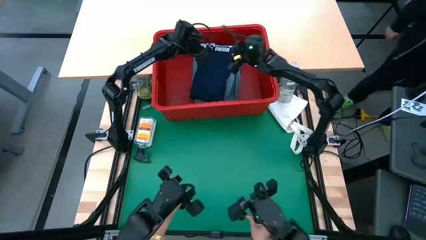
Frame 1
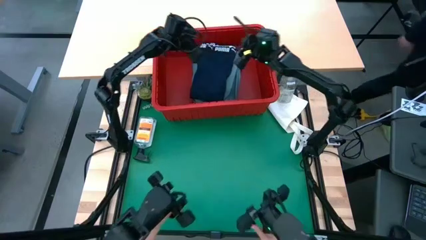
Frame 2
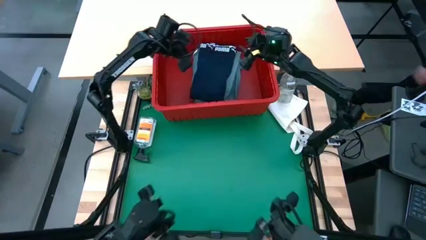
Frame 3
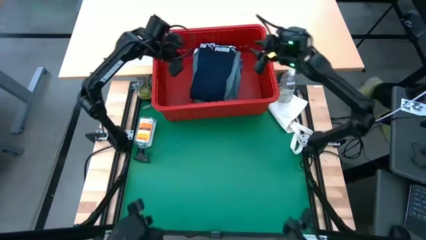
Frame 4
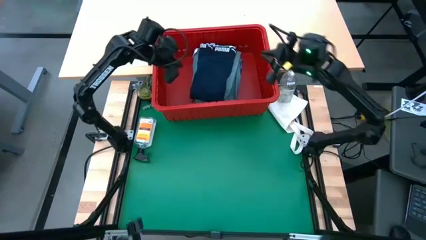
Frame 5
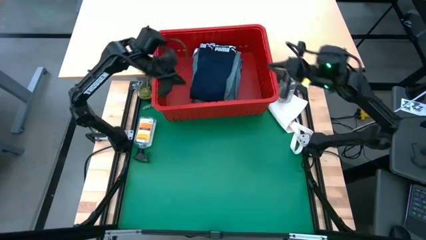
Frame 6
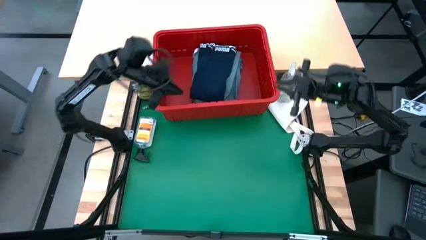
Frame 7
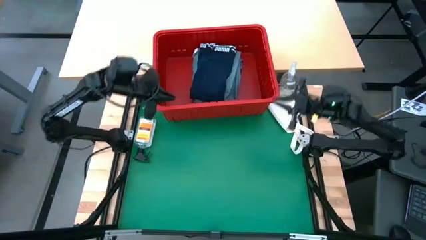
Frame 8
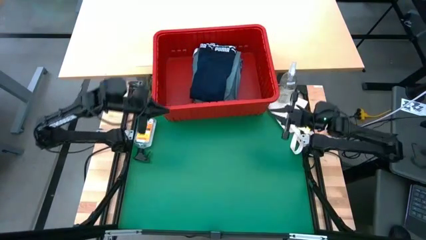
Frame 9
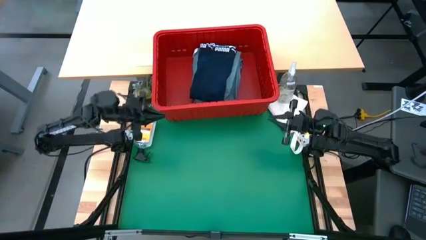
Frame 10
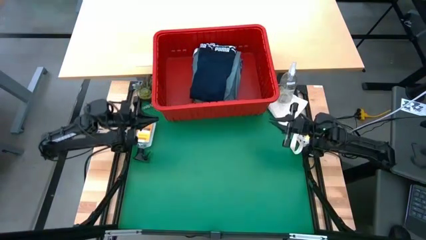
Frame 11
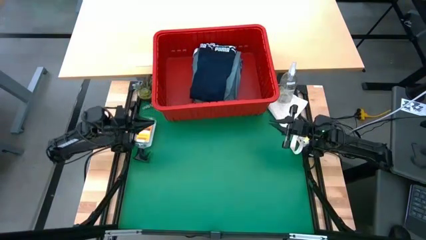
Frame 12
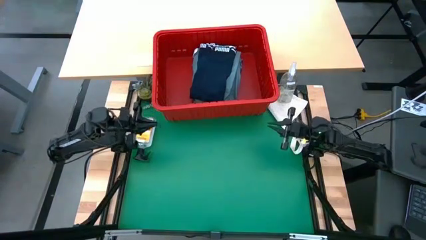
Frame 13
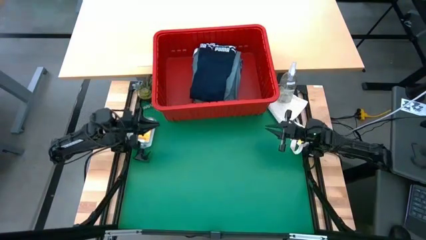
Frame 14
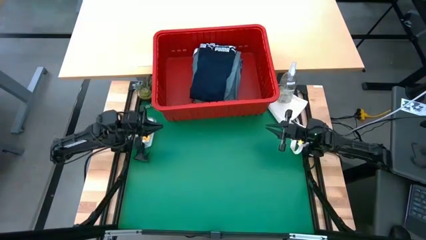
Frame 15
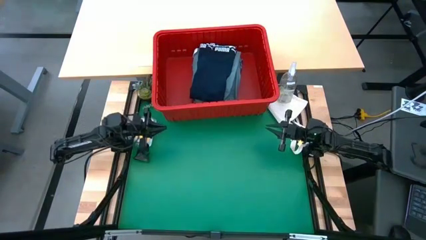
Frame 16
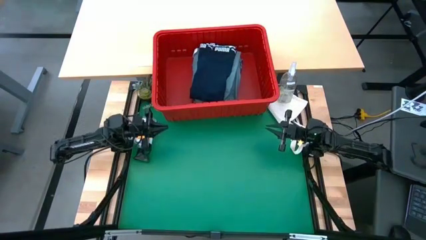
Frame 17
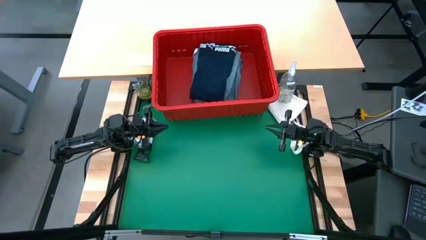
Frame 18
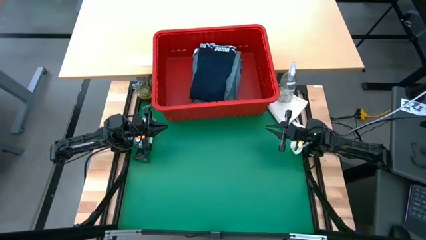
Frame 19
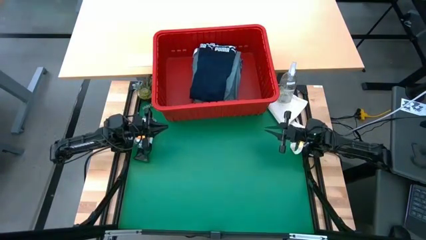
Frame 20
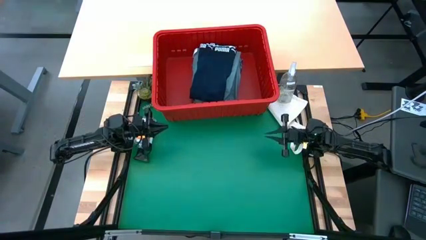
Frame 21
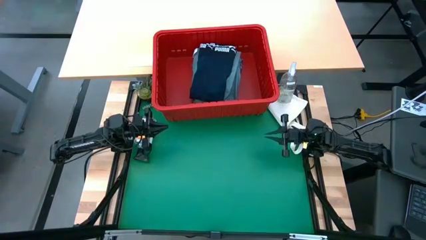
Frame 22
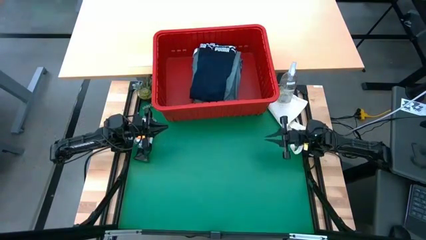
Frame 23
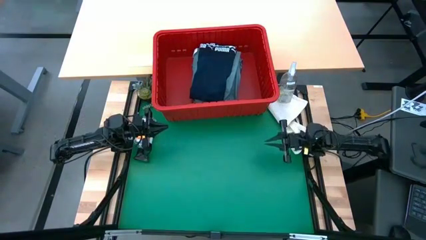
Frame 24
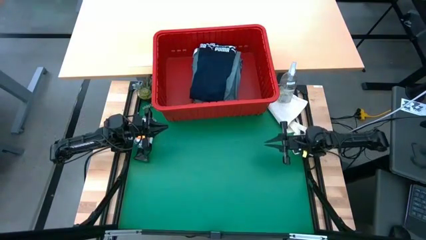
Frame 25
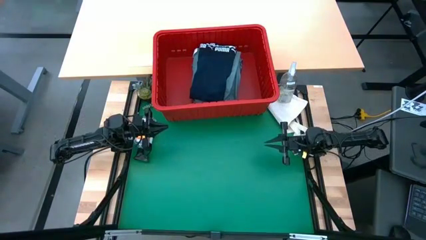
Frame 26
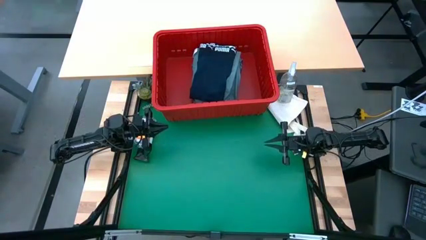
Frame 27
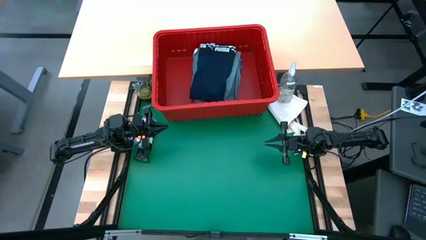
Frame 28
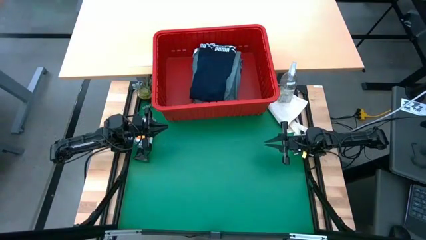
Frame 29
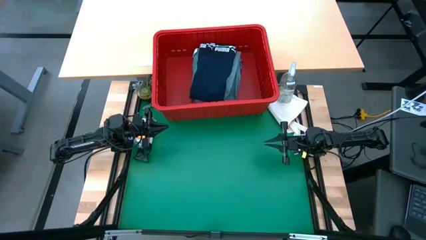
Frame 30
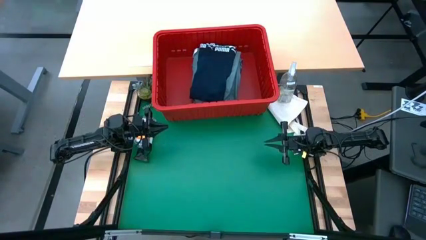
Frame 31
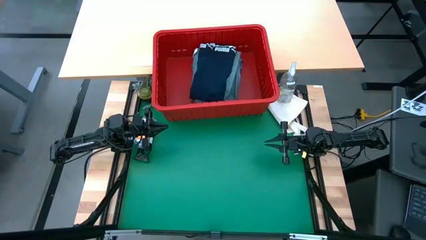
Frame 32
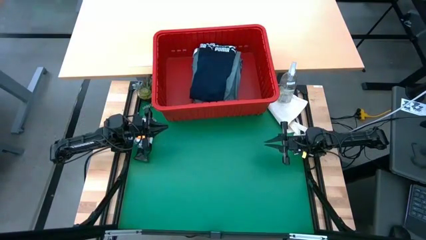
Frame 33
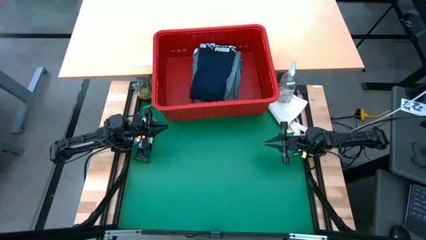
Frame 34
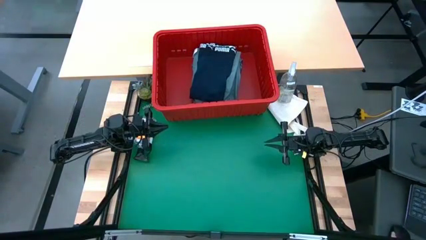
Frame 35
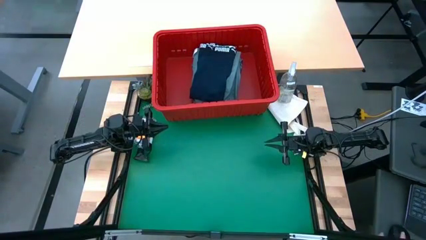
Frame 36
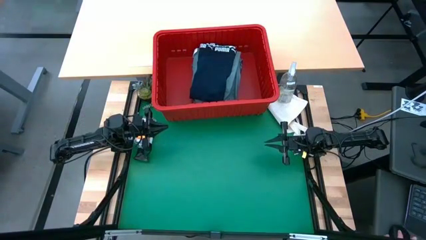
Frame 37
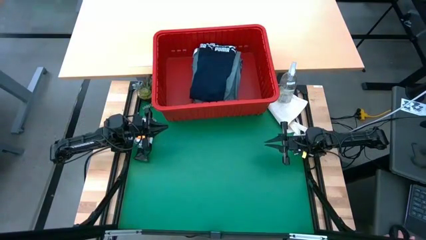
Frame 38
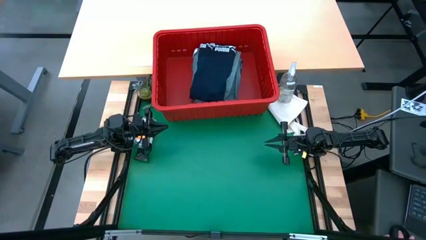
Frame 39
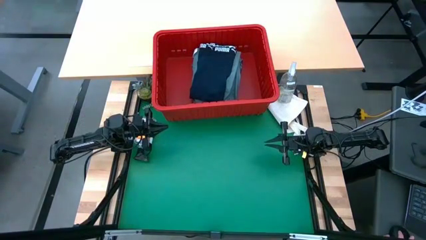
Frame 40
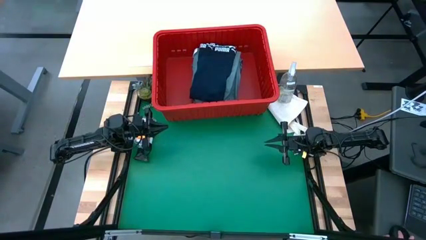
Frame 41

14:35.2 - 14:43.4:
Task: Fold Laundry from Bin
Return to Home Position

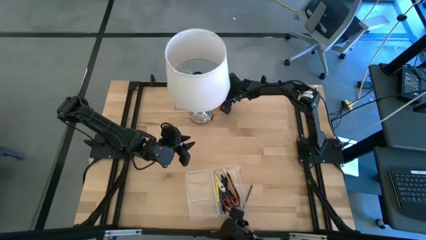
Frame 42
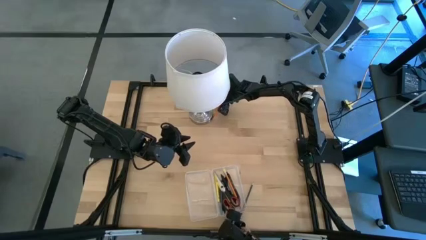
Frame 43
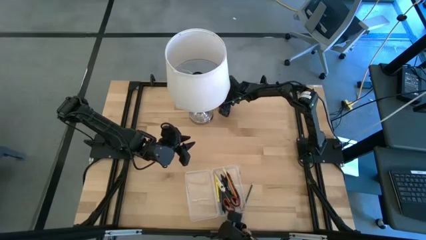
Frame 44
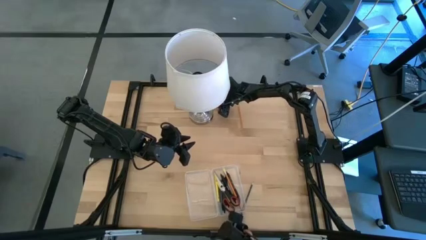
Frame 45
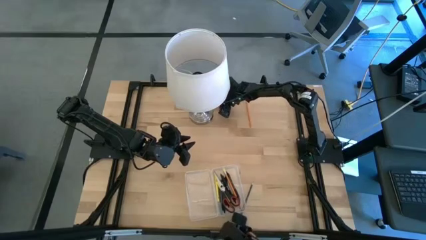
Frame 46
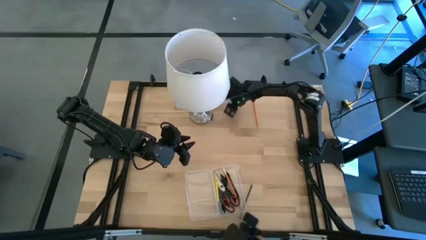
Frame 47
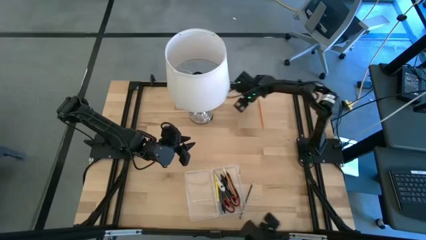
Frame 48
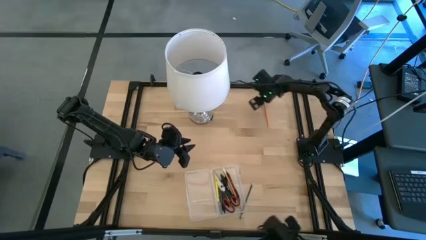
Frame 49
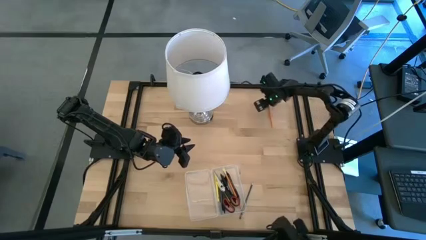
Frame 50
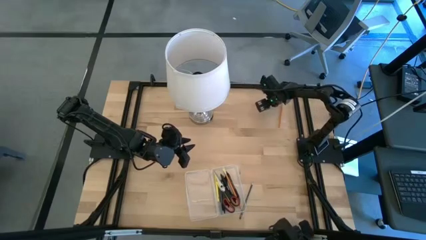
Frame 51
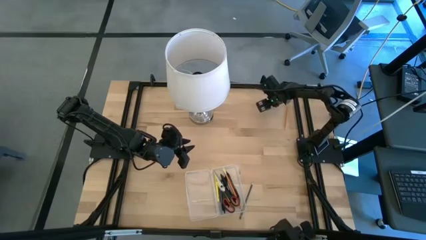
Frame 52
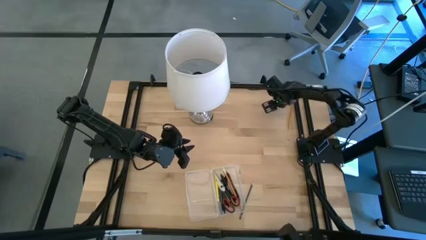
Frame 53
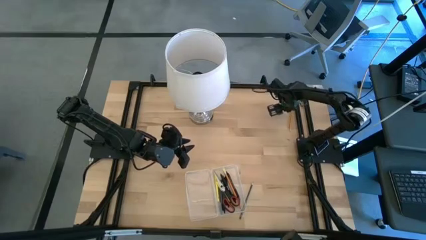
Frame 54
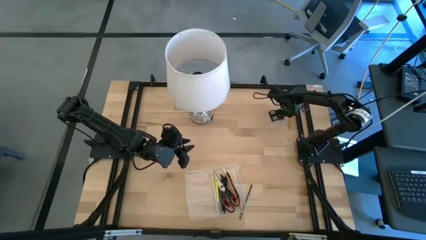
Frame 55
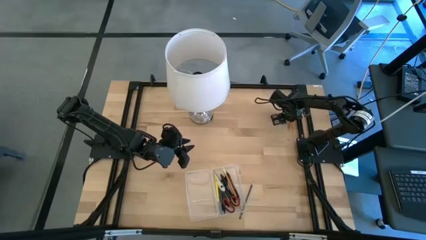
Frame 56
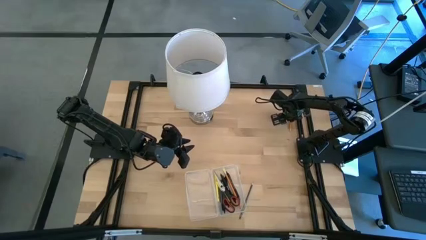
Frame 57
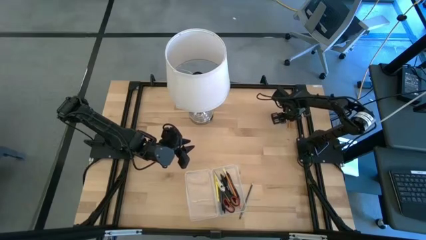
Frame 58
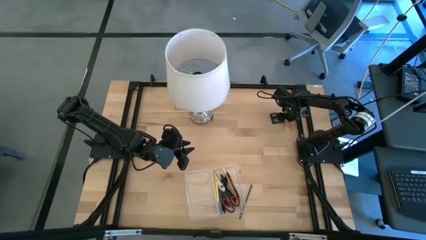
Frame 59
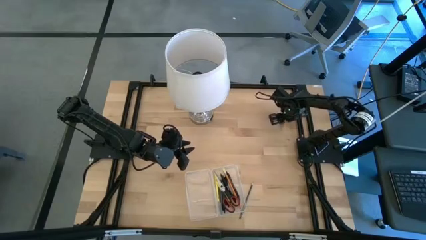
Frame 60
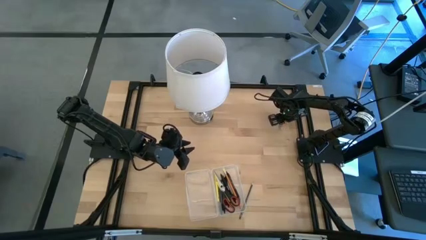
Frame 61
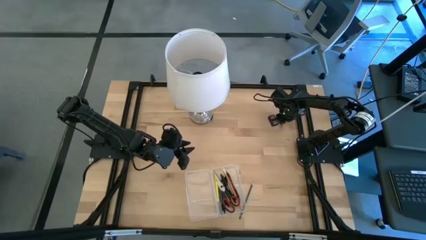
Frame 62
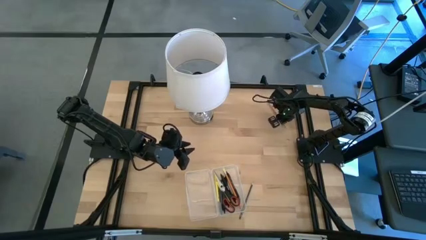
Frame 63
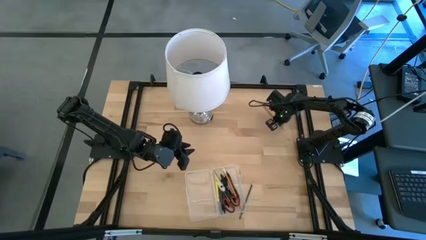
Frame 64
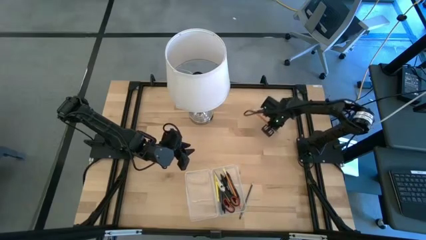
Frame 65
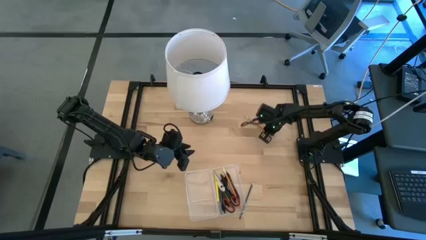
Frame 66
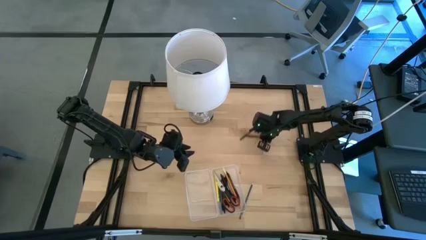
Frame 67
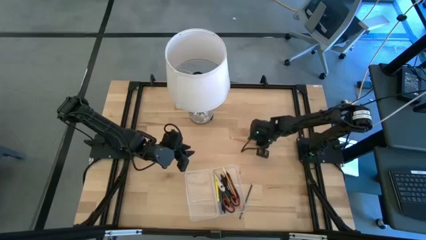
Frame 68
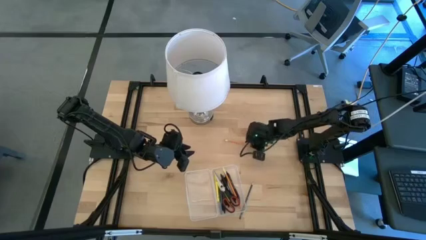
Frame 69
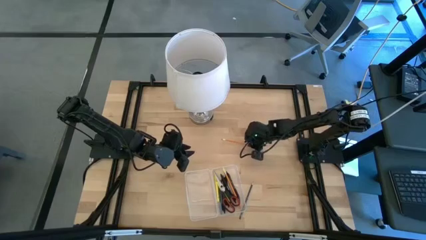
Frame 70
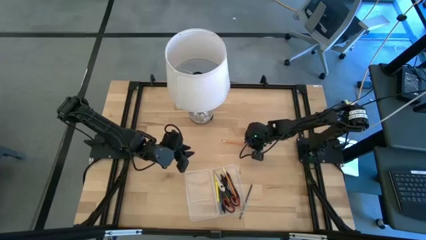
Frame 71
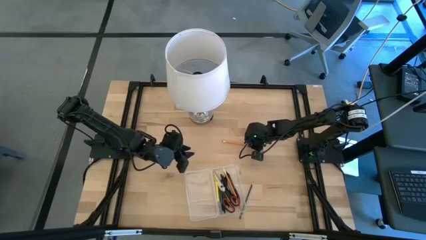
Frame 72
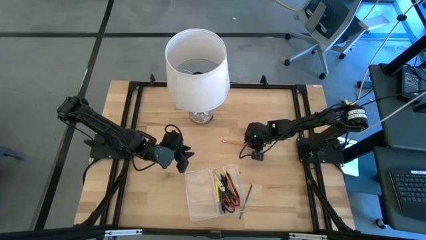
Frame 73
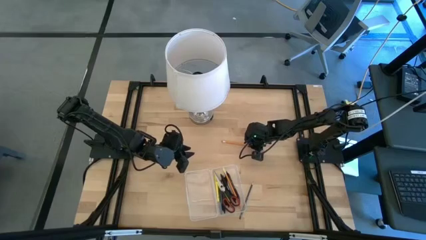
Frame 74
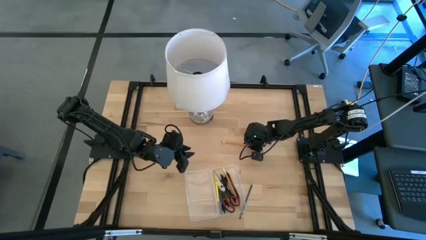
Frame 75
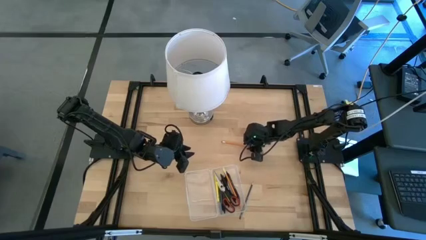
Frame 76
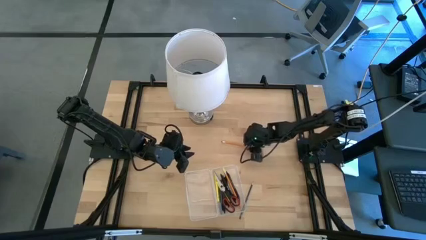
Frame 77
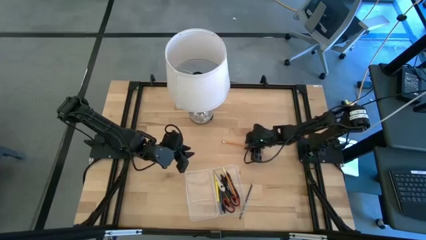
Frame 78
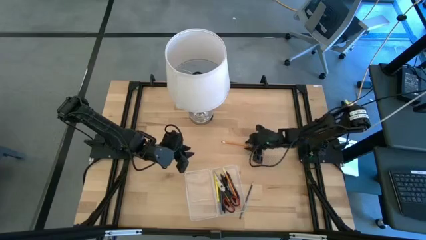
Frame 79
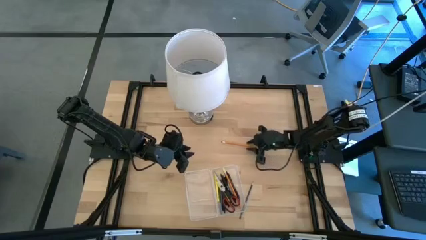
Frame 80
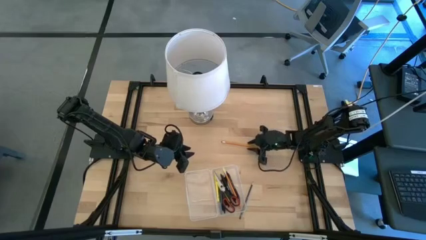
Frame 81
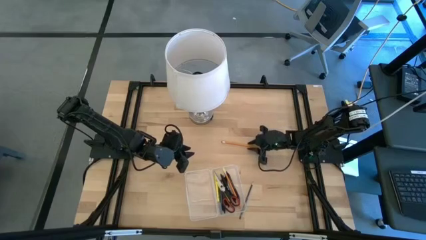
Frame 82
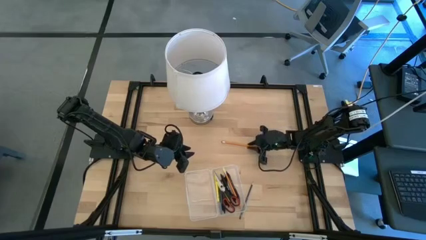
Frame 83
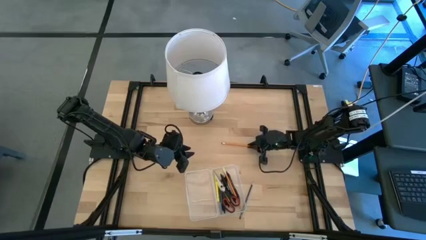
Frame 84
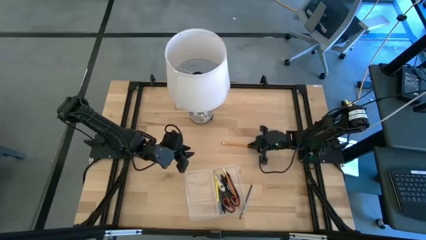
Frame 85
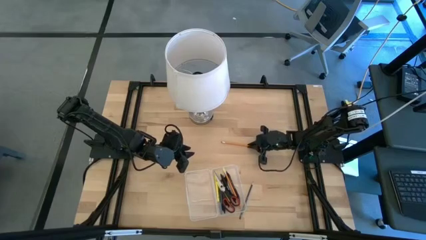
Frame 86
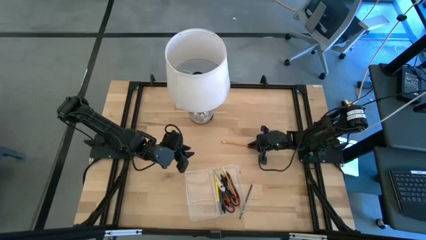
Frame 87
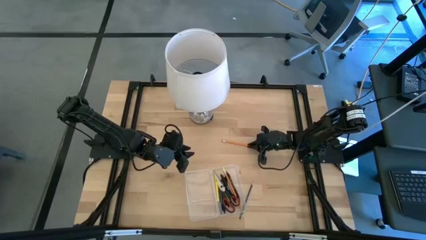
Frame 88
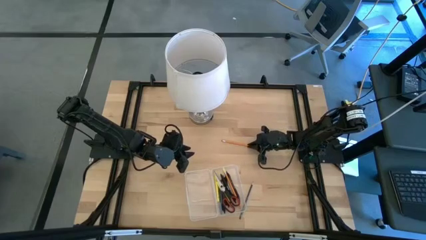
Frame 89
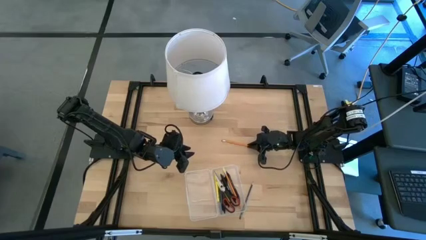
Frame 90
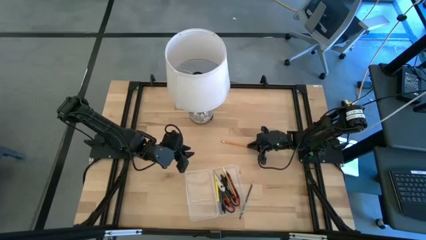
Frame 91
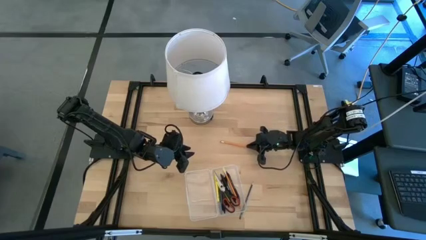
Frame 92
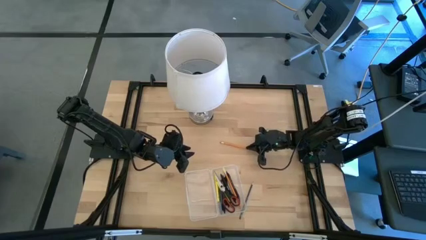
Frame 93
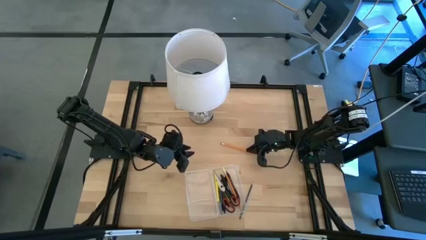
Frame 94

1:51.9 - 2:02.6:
Task: Pick & place school supplies into a supply box
Put the orange pencil into the transparent supply box
